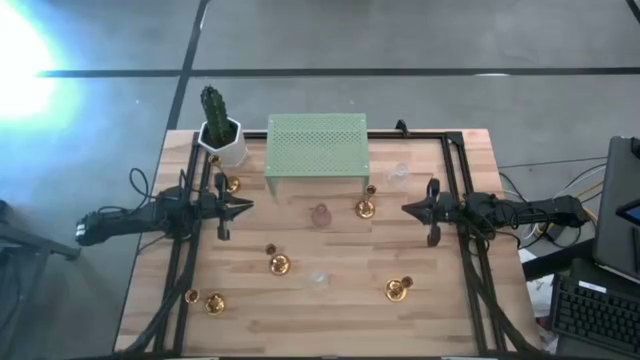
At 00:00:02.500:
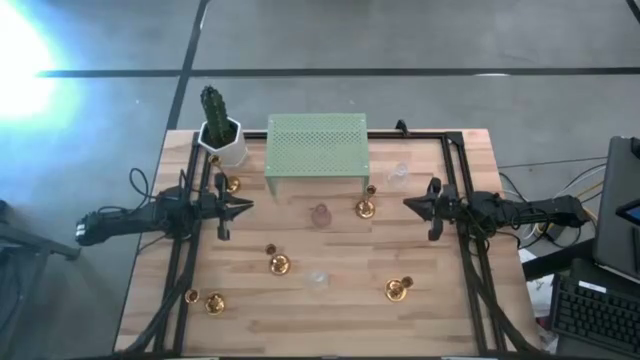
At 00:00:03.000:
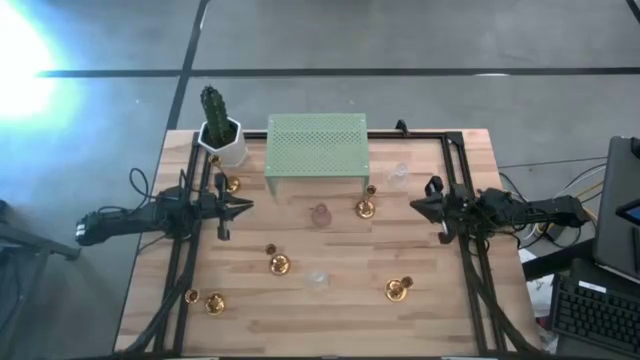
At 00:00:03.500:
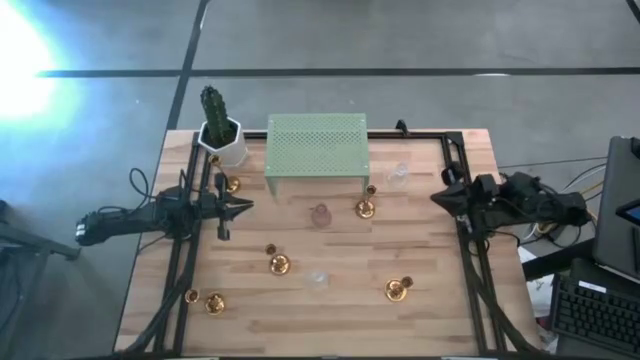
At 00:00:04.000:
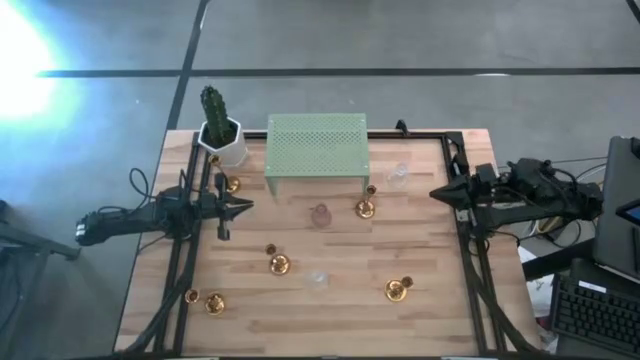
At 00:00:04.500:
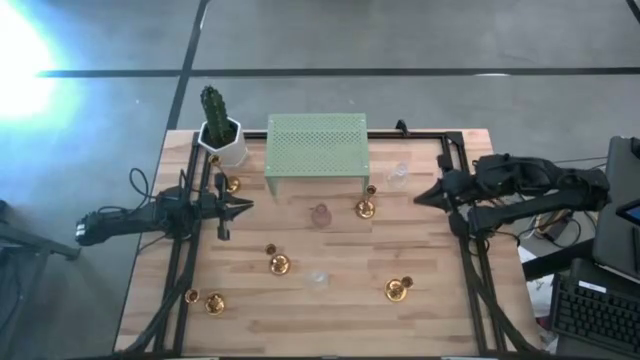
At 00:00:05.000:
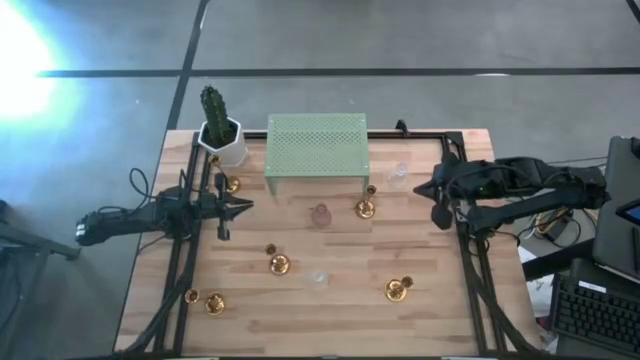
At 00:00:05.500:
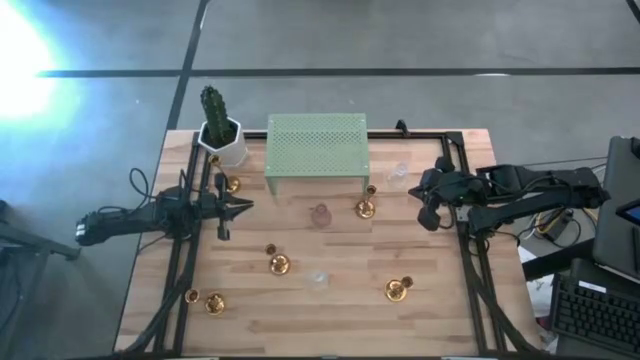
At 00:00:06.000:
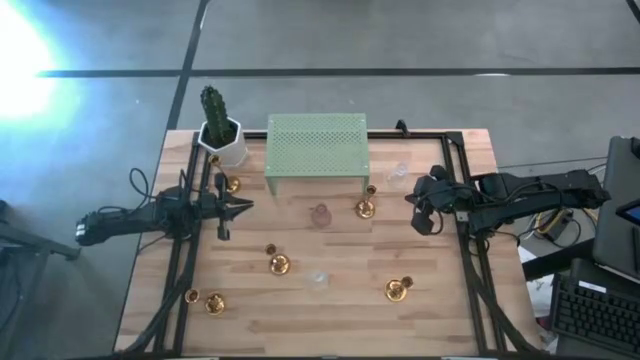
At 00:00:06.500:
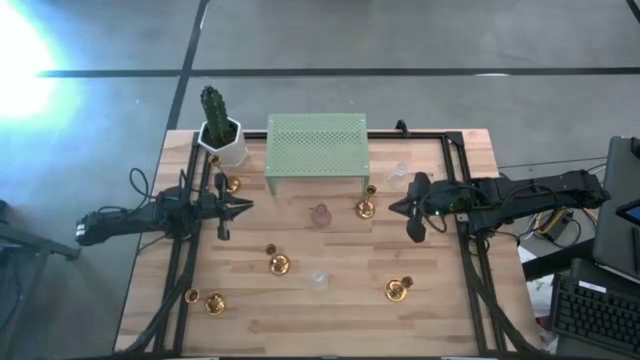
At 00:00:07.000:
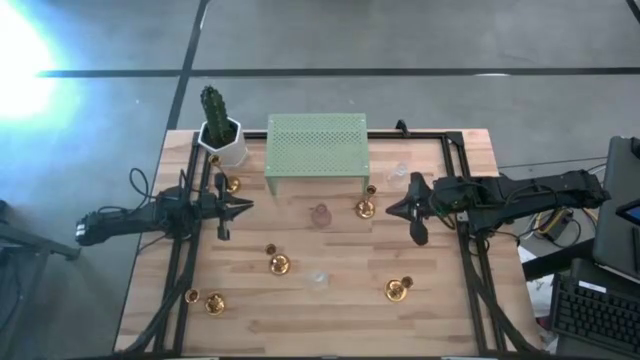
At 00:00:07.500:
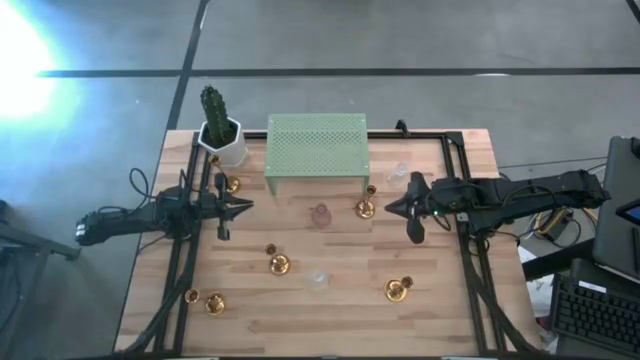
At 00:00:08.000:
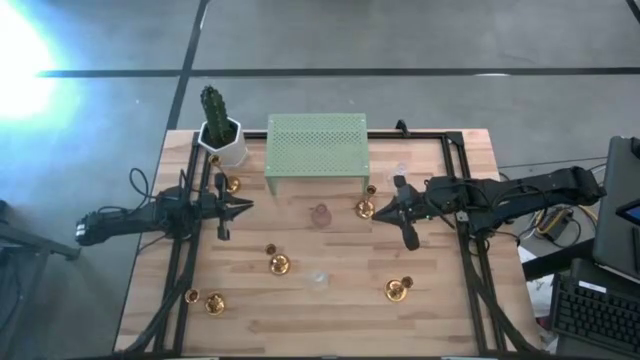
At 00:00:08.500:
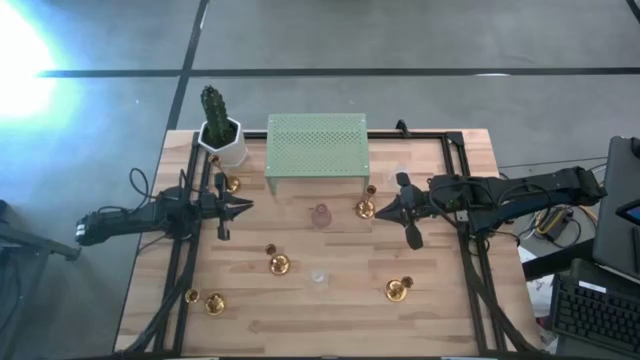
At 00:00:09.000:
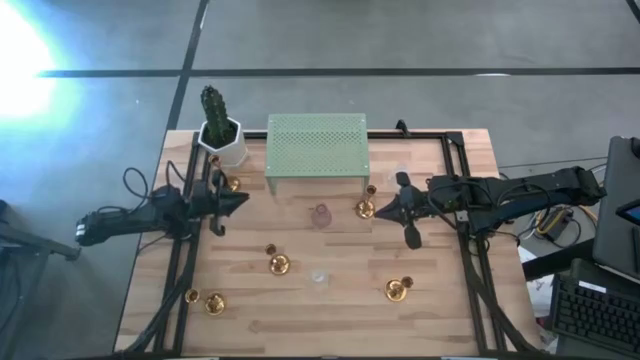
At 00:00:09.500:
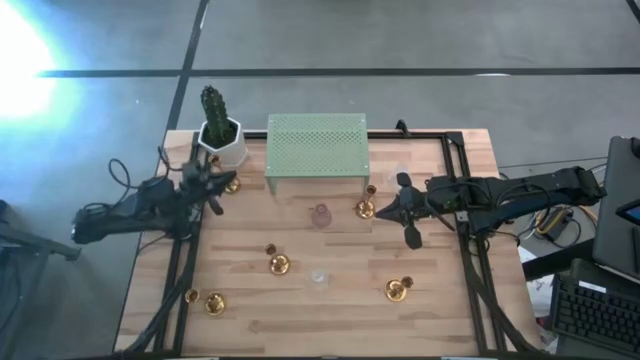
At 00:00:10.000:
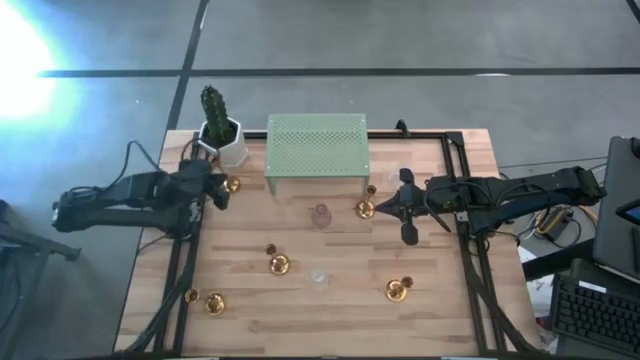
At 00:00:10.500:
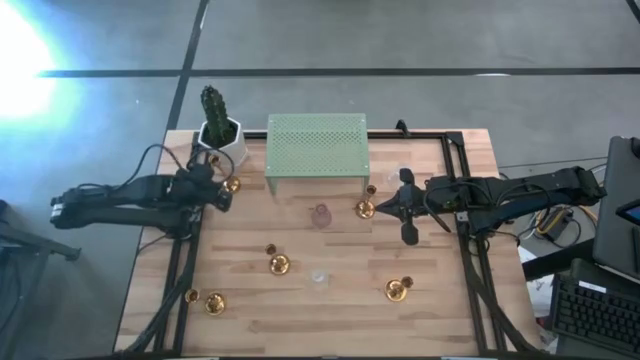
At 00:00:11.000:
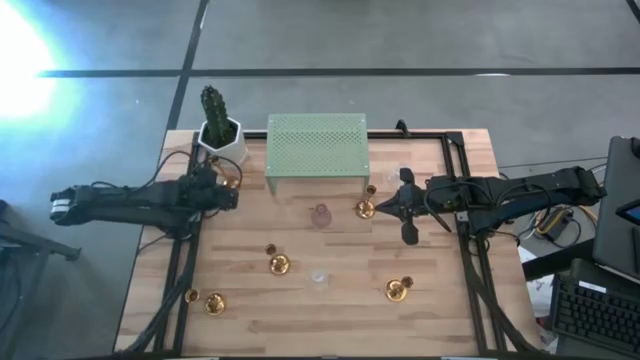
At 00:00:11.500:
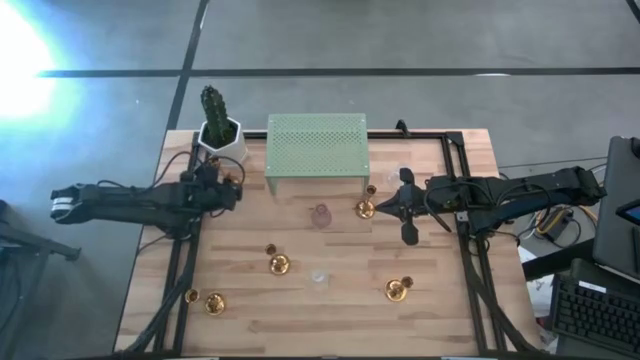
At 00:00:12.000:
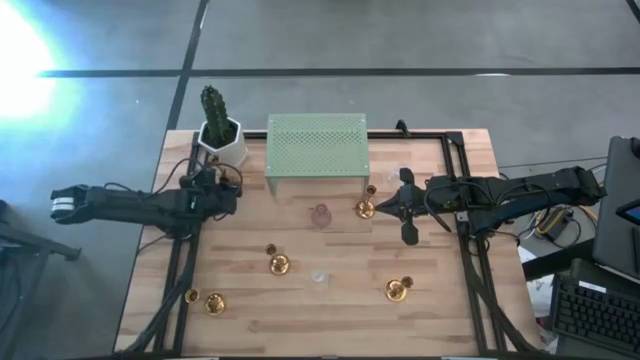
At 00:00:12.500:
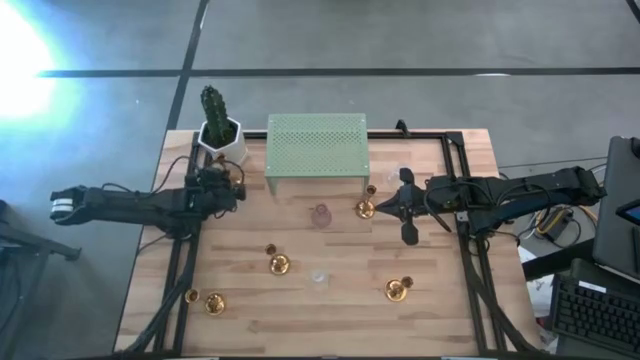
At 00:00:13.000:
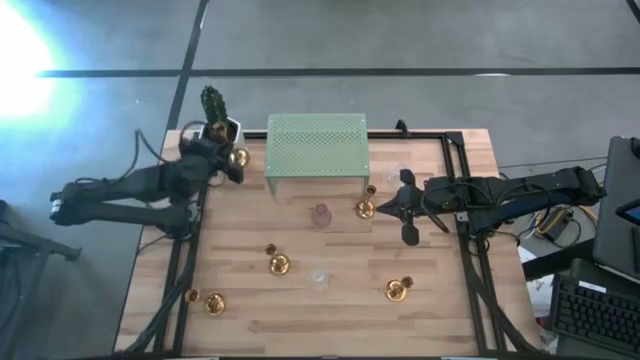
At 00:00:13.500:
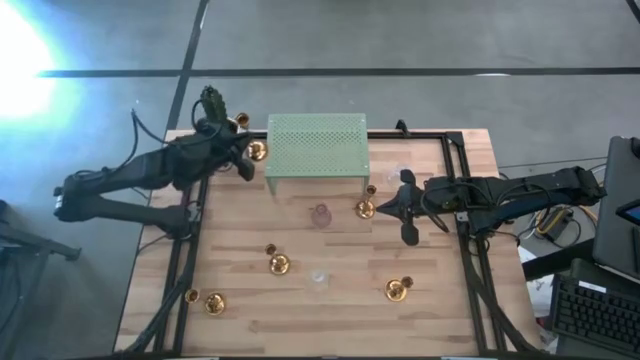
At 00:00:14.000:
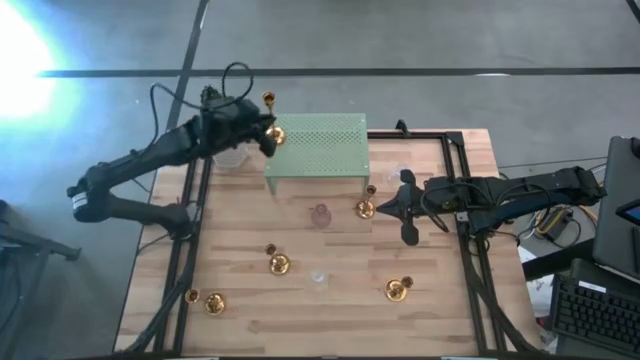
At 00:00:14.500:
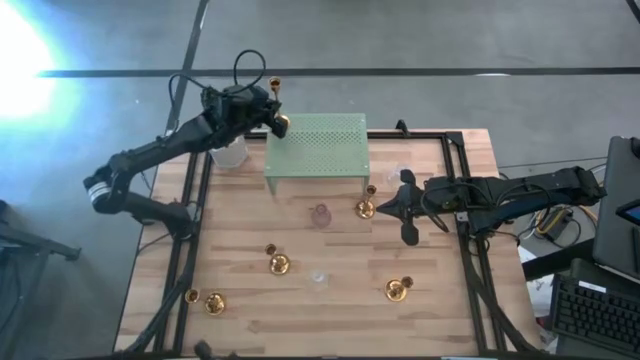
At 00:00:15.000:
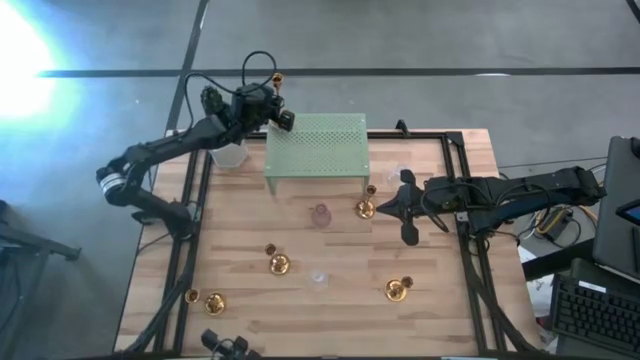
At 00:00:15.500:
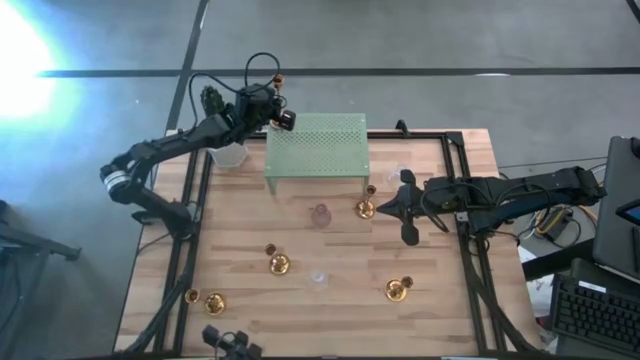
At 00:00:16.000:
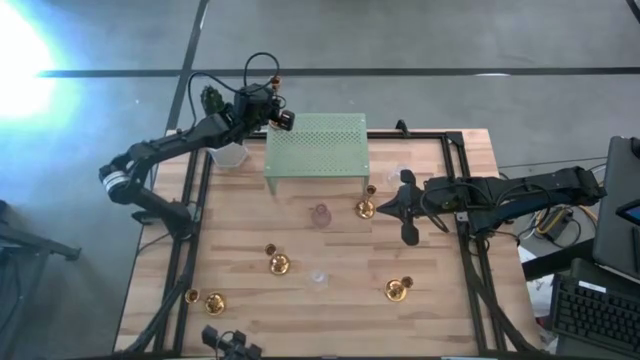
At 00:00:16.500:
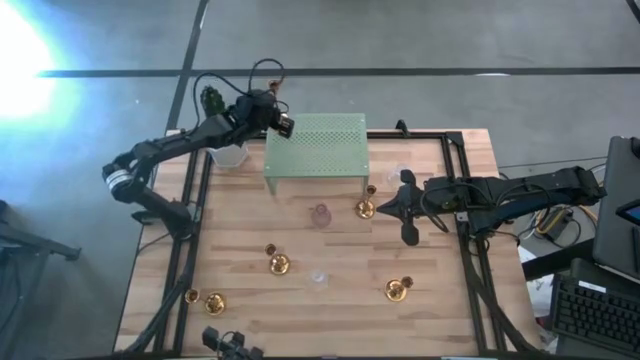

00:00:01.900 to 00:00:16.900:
Task: Pick & Place candle stick holders
Put the gold candle holder on the shelf

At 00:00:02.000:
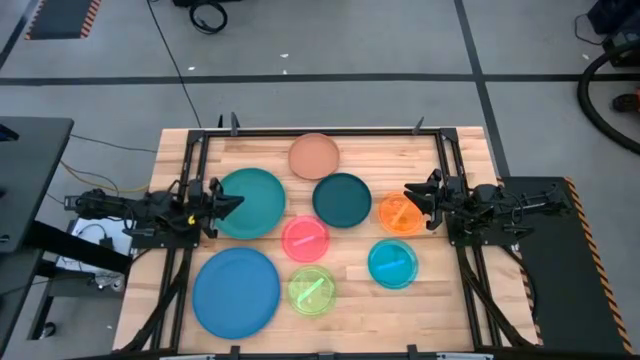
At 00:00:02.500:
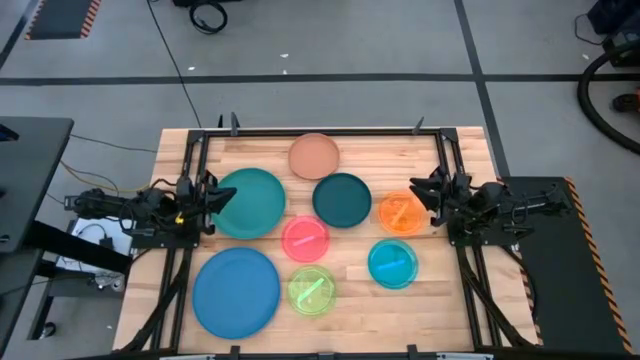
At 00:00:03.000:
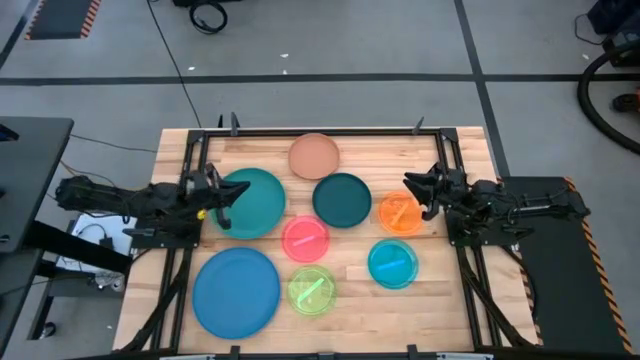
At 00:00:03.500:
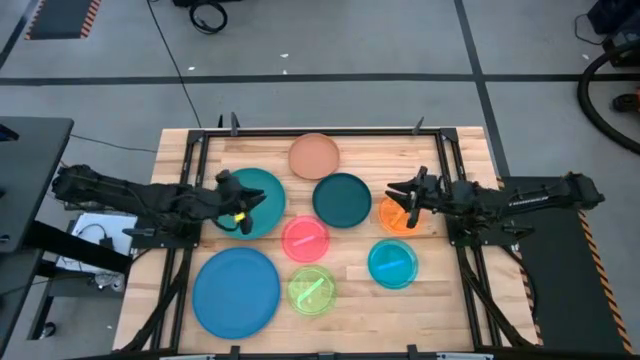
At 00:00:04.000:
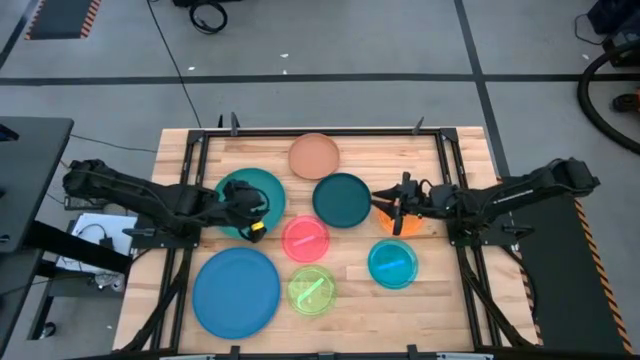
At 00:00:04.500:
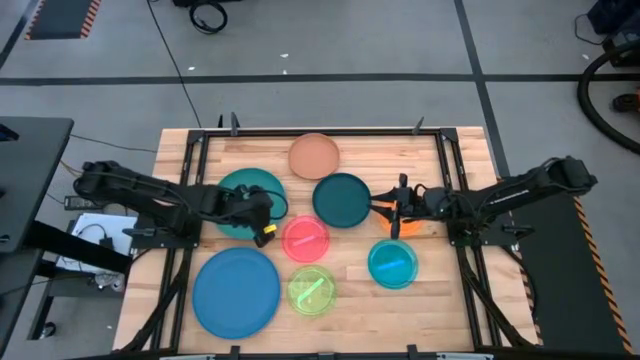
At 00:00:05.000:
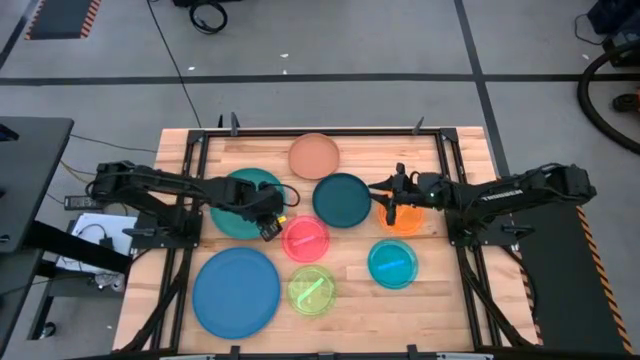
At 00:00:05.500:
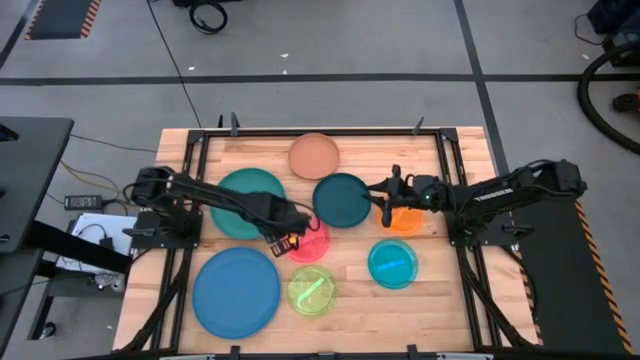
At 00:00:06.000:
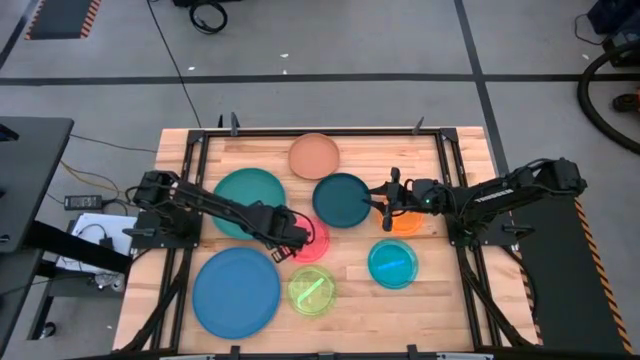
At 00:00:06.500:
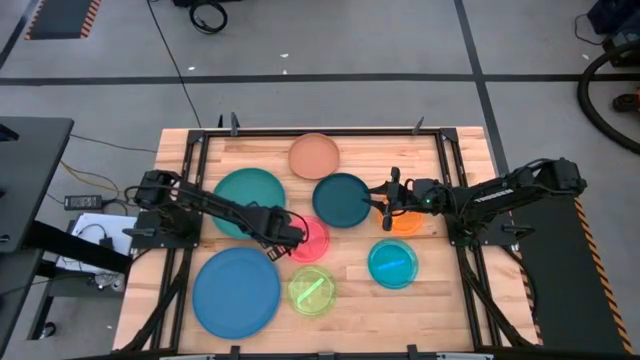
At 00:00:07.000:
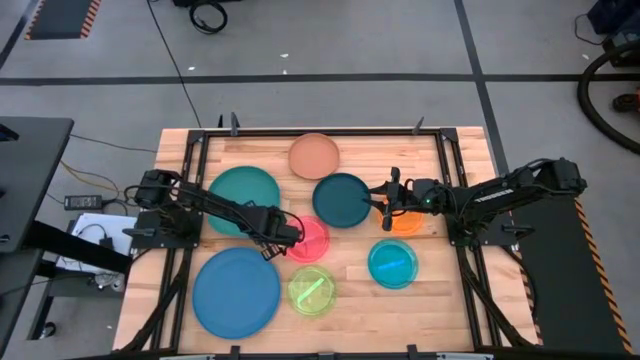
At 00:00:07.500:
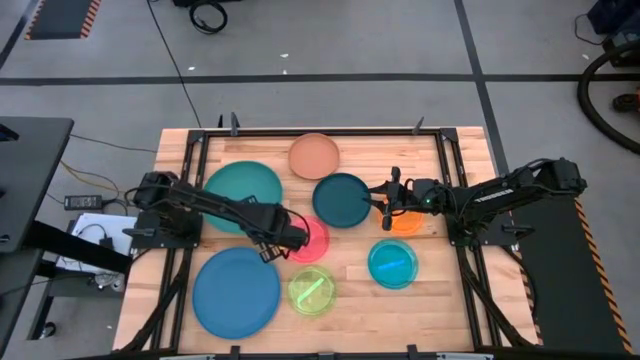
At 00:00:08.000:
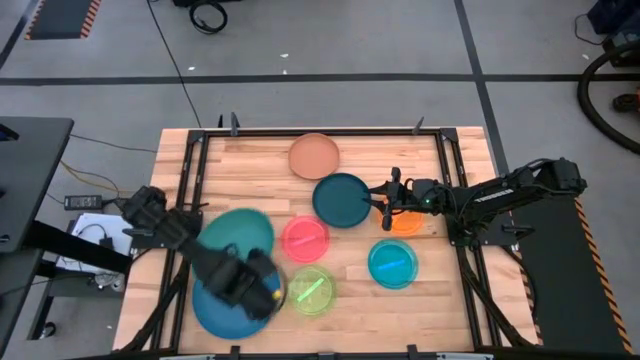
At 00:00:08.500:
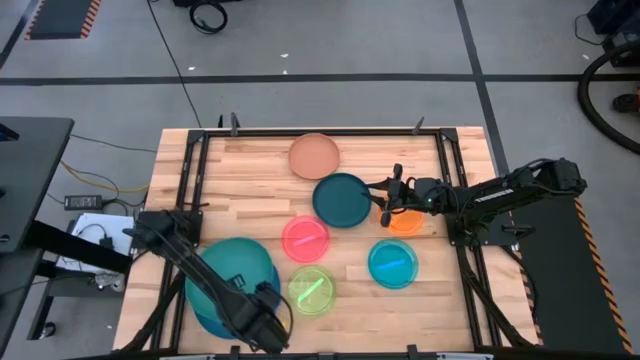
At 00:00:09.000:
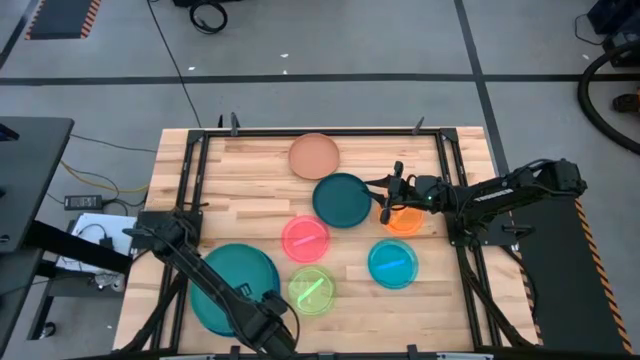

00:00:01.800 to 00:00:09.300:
Task: Stack plastic plates
Stack the green plate on top of the blue plate
